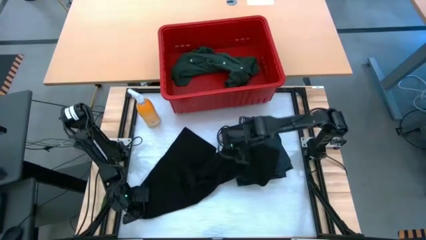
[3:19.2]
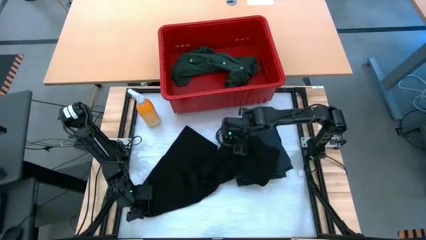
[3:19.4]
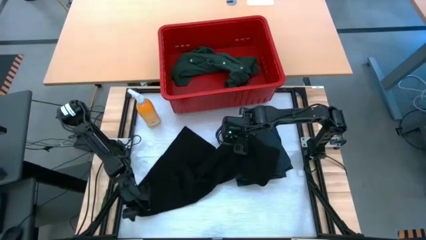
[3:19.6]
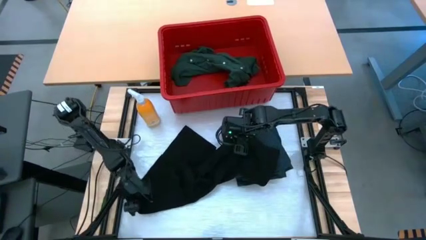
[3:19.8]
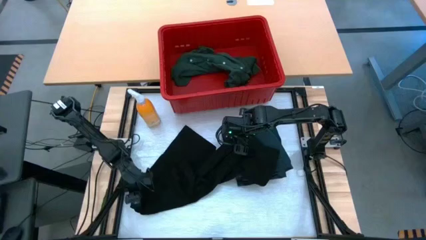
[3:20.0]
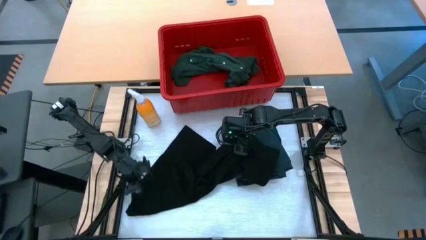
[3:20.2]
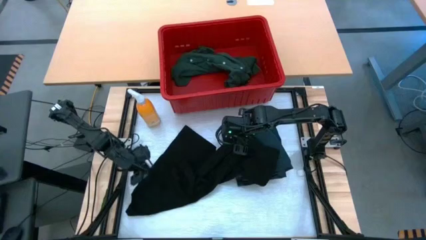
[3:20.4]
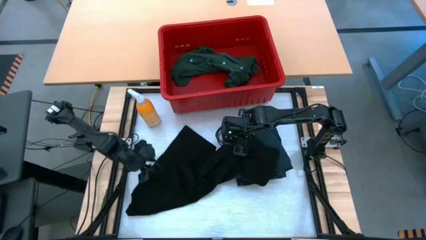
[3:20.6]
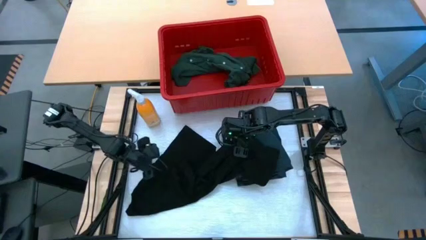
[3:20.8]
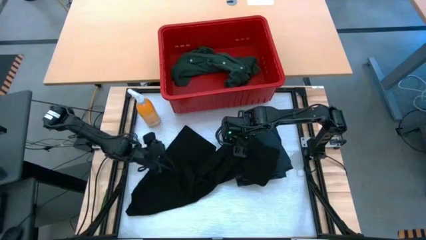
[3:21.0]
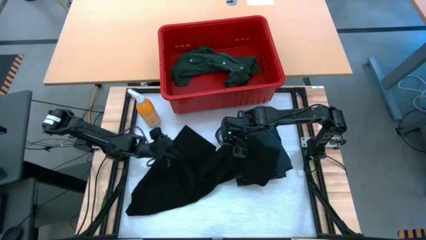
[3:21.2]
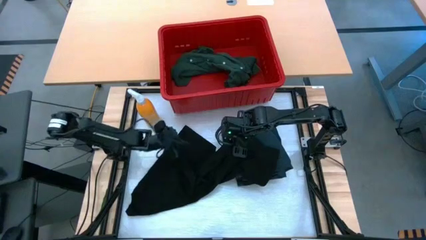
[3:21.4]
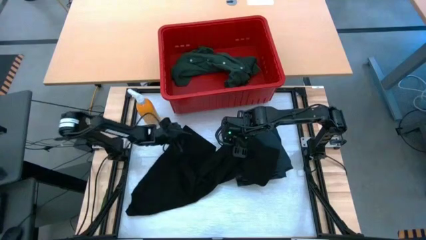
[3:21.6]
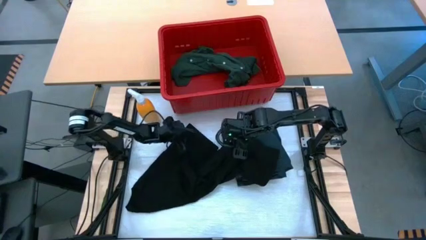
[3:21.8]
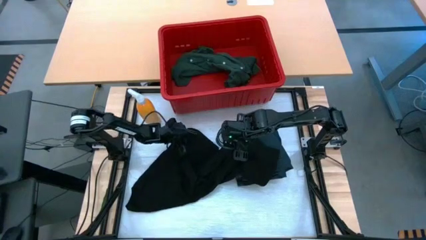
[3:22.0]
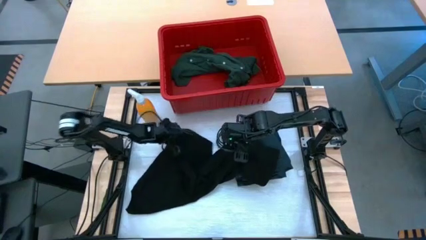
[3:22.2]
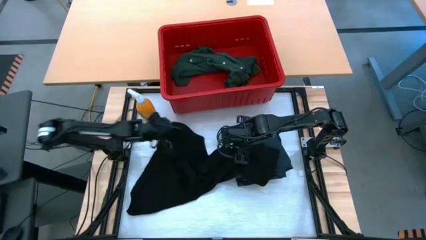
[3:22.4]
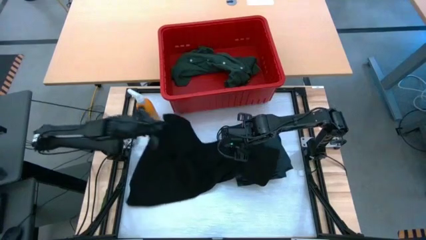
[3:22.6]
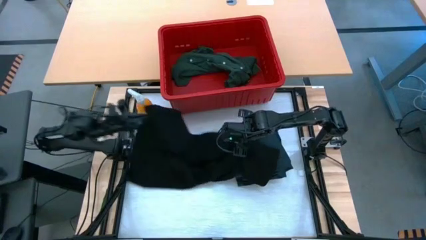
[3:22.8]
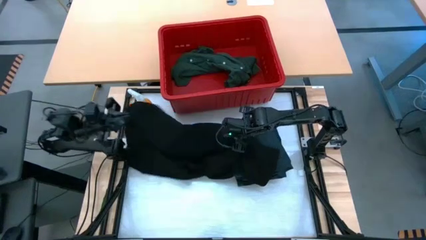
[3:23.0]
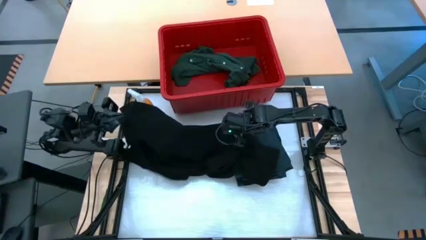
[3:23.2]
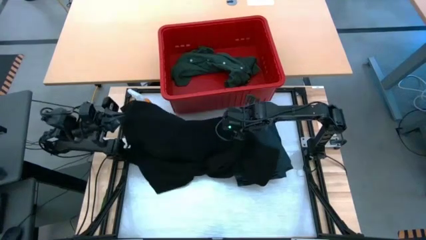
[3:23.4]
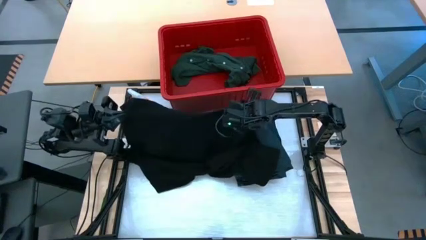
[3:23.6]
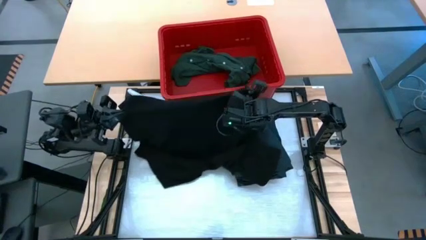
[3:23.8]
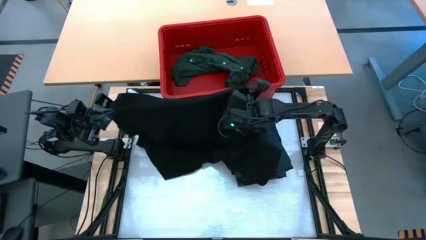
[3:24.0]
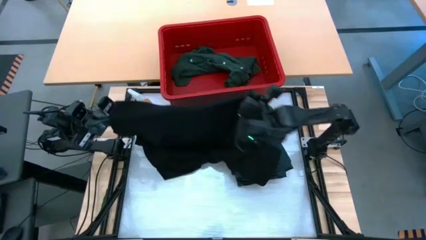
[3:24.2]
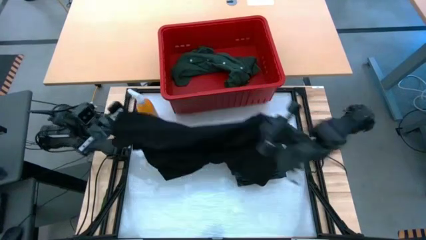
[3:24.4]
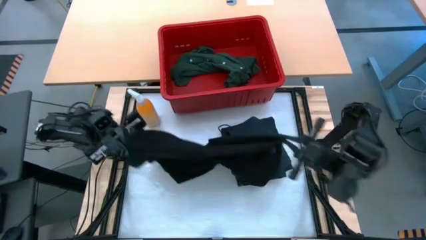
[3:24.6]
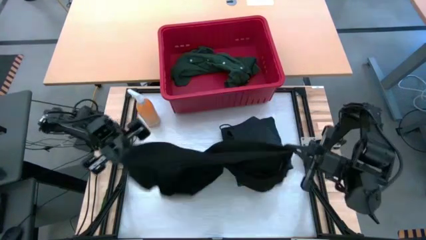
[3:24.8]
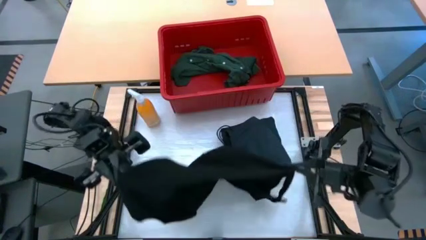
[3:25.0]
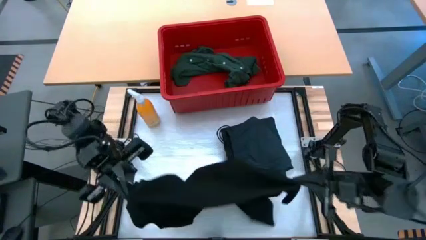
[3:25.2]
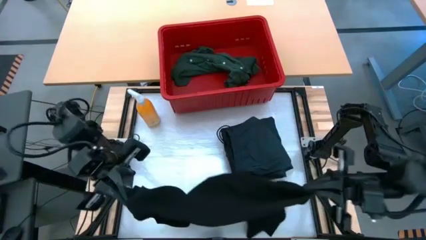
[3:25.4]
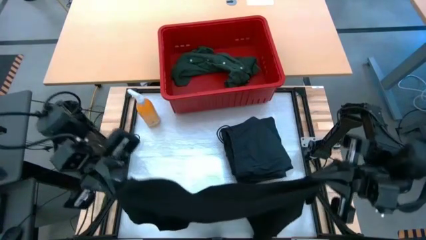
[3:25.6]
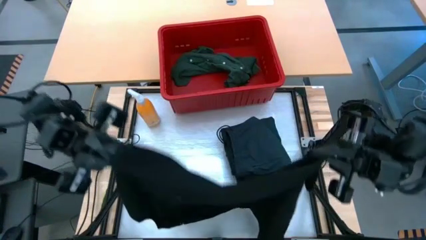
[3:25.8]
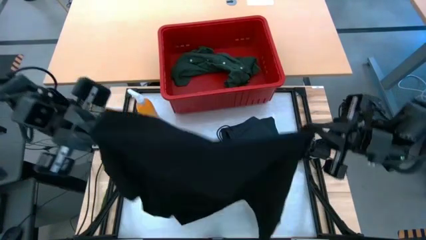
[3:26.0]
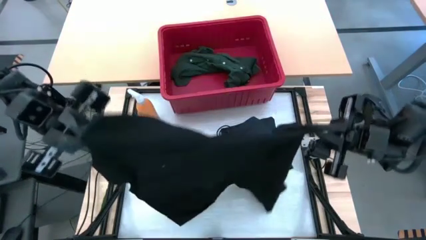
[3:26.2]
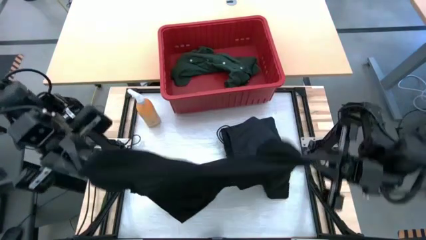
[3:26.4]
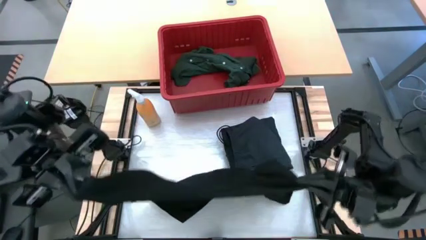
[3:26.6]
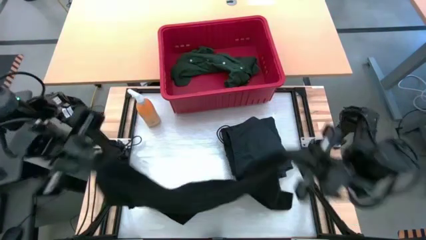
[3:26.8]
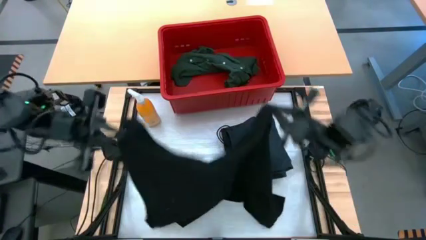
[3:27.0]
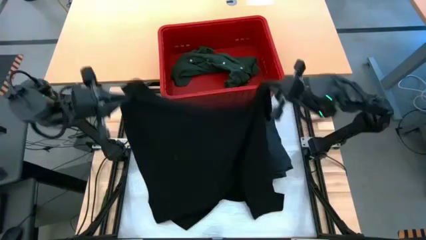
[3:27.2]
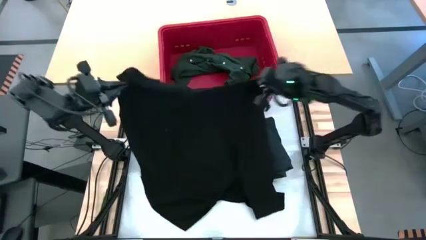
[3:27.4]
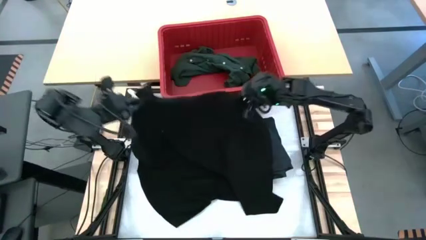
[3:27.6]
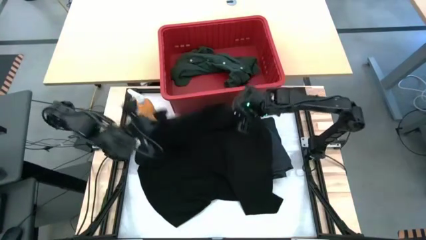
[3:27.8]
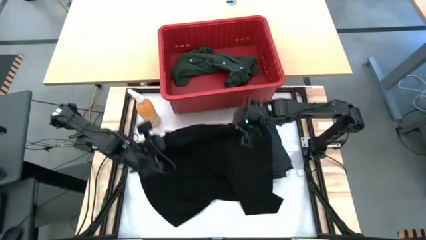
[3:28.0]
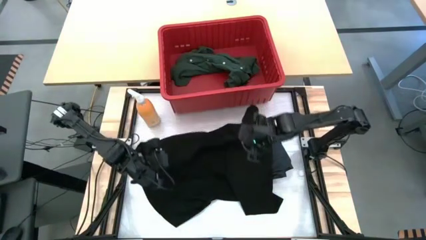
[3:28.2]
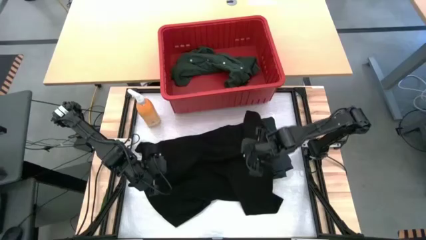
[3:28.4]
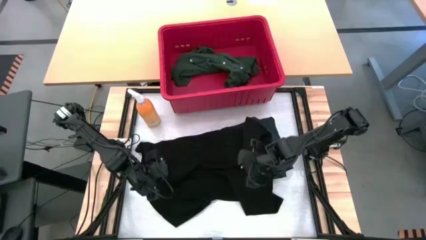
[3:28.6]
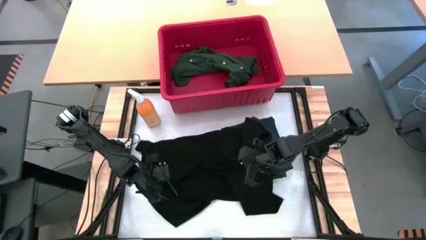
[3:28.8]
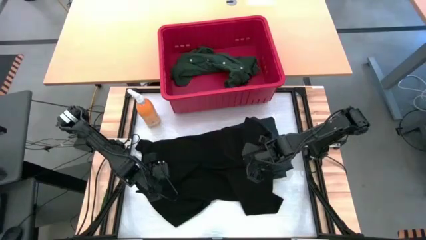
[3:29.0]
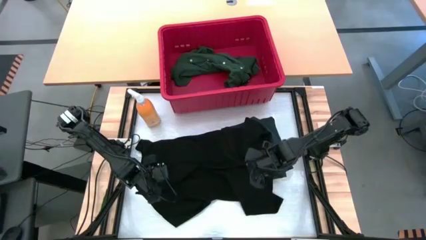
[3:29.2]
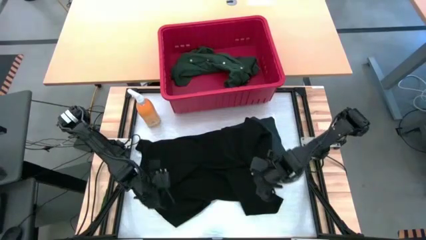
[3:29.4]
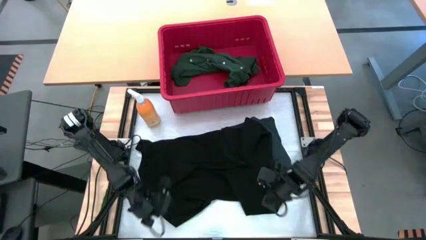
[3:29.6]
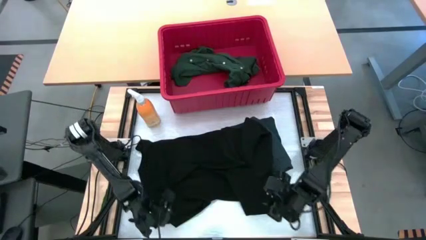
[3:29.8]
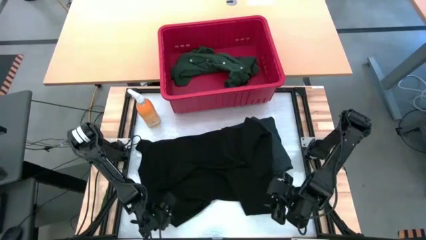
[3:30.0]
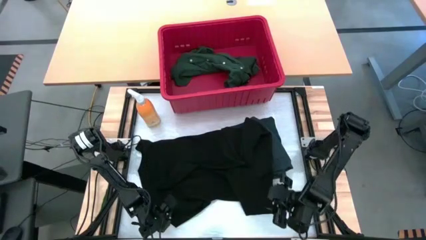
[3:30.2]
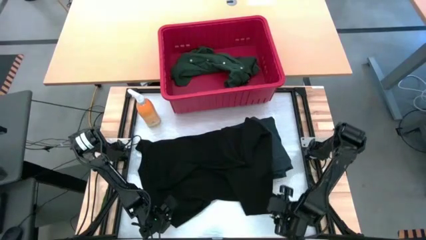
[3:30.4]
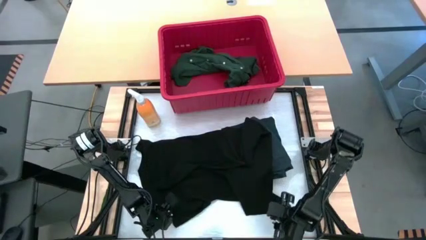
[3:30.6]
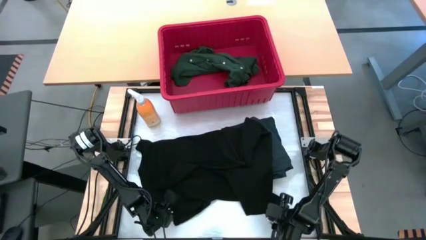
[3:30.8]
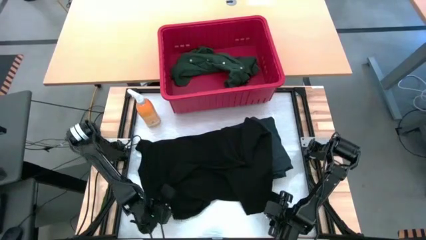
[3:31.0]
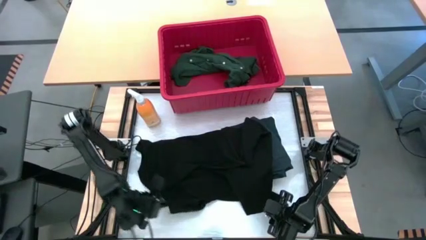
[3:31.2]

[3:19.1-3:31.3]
Task: Fold Laundry from Bin
Fold the black shirt
